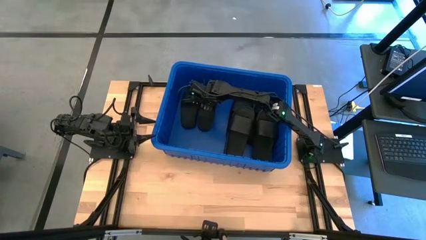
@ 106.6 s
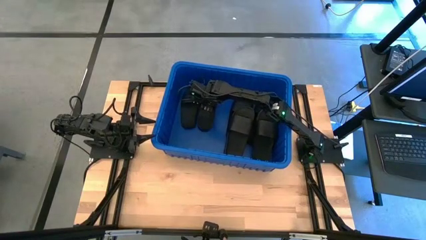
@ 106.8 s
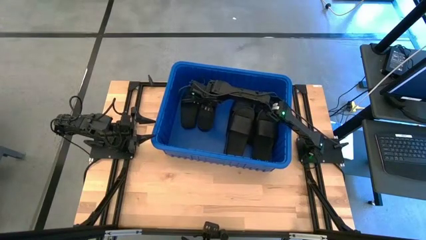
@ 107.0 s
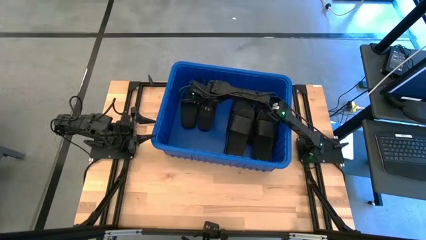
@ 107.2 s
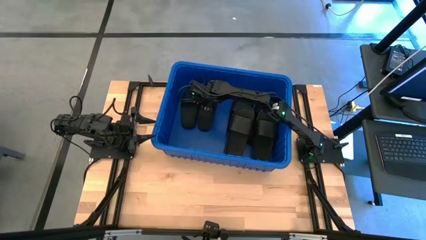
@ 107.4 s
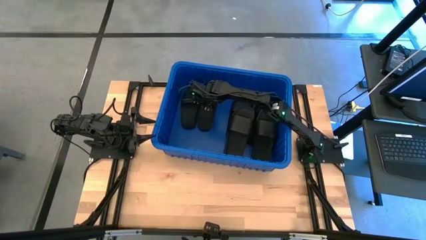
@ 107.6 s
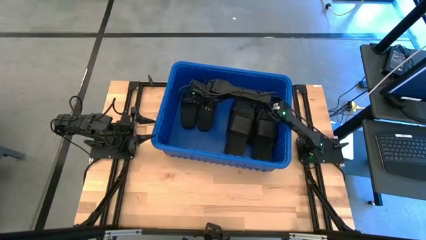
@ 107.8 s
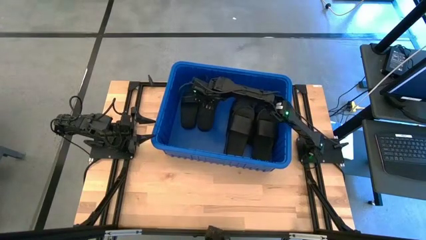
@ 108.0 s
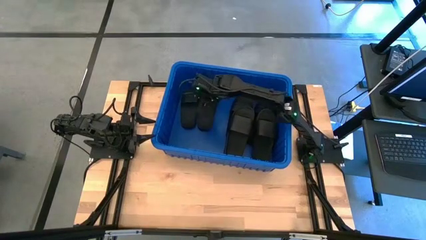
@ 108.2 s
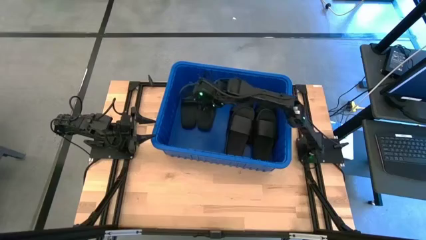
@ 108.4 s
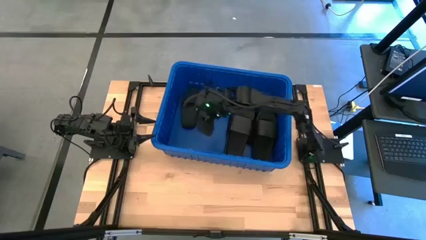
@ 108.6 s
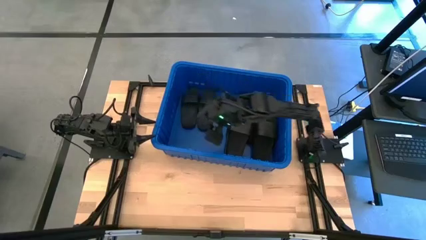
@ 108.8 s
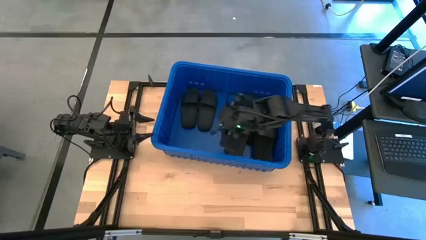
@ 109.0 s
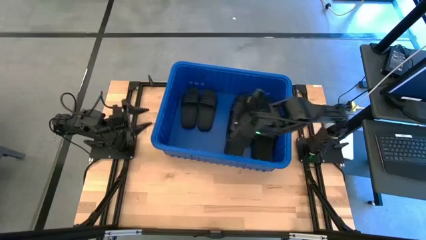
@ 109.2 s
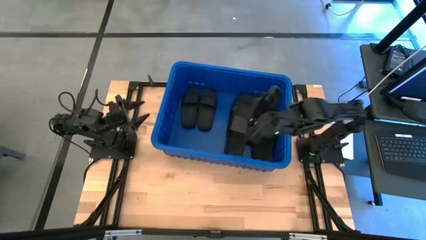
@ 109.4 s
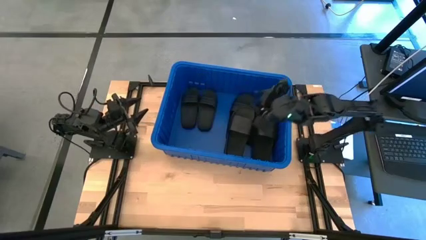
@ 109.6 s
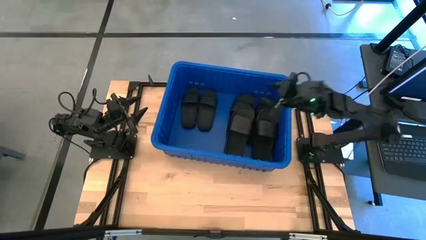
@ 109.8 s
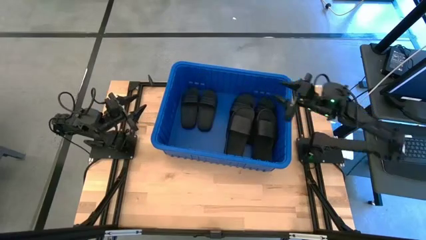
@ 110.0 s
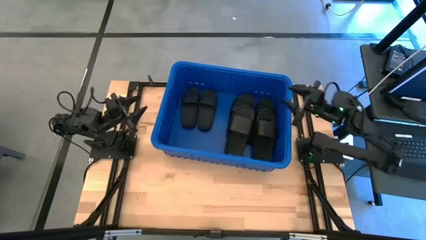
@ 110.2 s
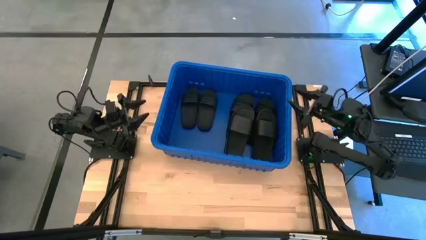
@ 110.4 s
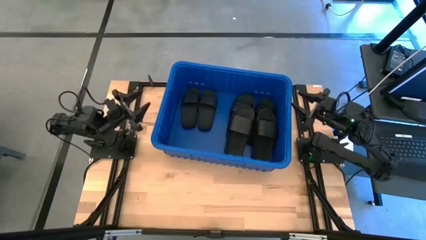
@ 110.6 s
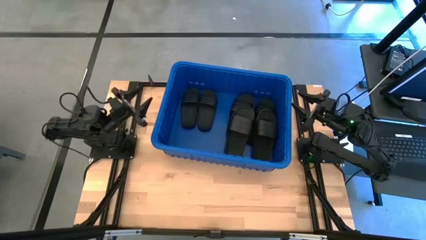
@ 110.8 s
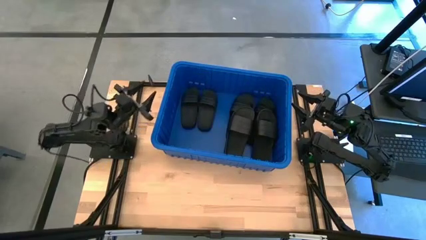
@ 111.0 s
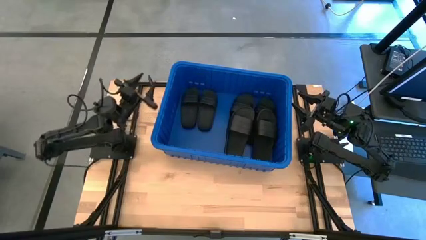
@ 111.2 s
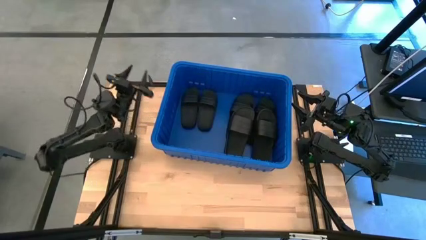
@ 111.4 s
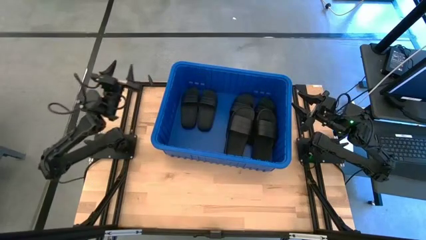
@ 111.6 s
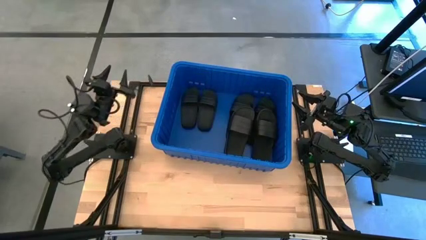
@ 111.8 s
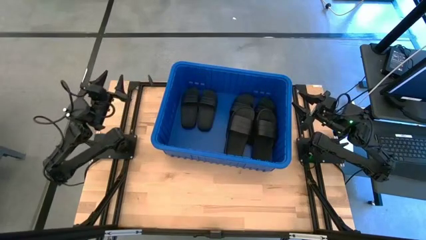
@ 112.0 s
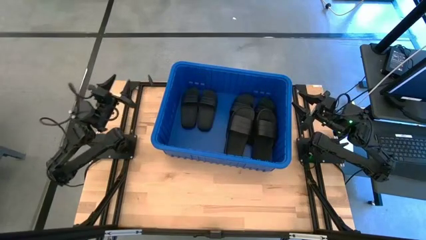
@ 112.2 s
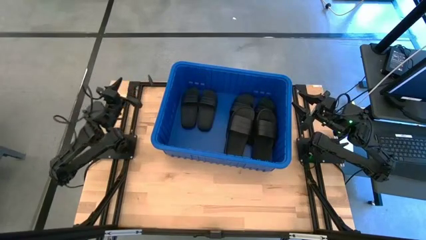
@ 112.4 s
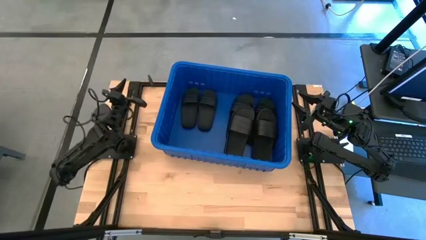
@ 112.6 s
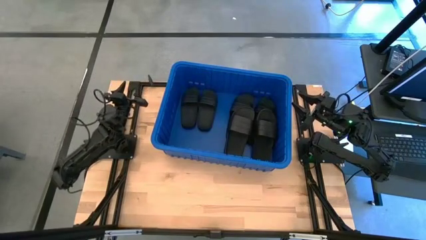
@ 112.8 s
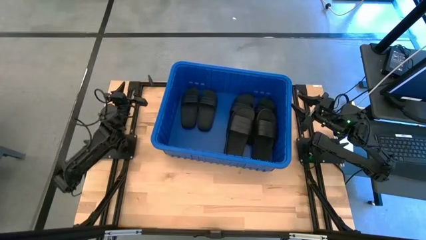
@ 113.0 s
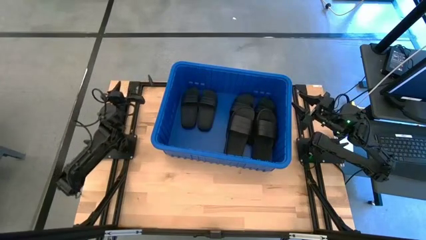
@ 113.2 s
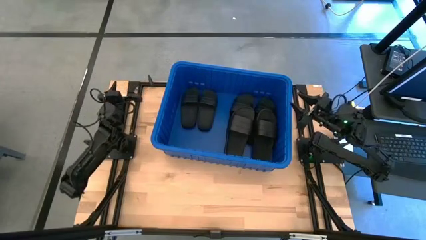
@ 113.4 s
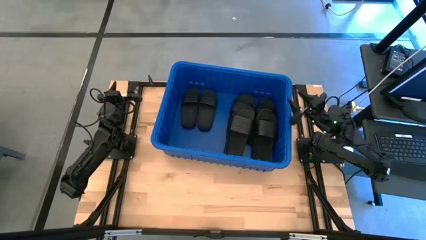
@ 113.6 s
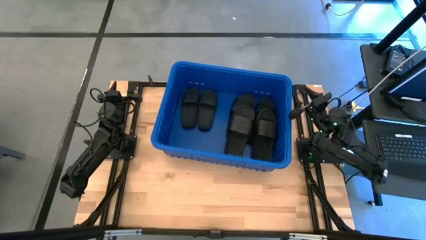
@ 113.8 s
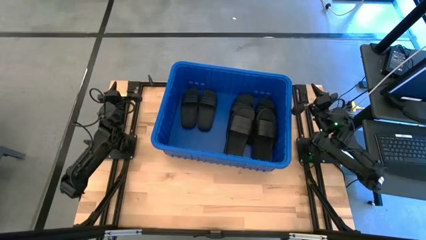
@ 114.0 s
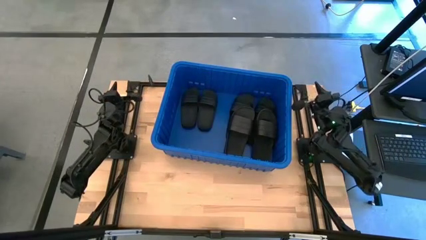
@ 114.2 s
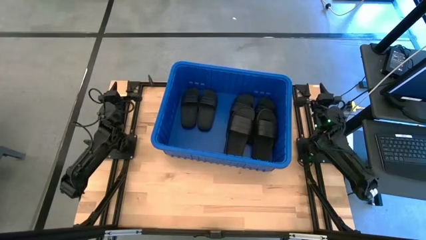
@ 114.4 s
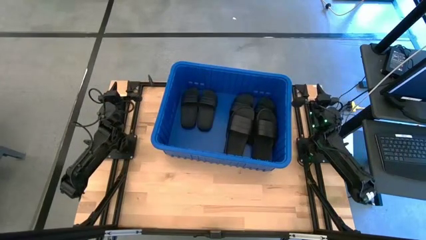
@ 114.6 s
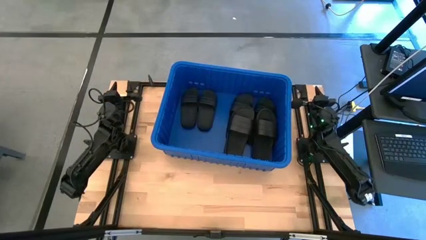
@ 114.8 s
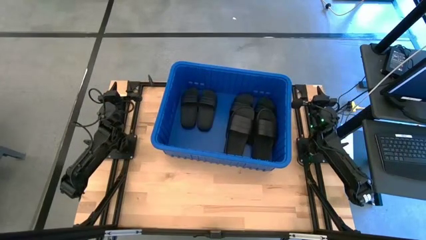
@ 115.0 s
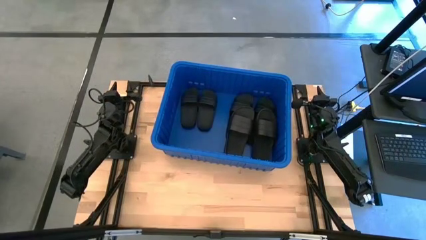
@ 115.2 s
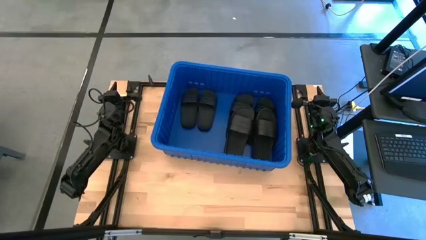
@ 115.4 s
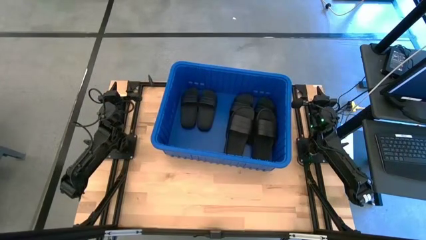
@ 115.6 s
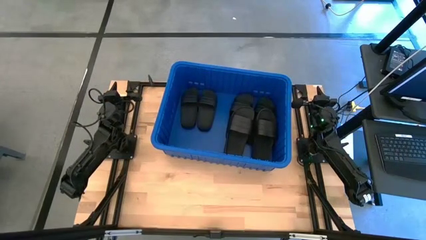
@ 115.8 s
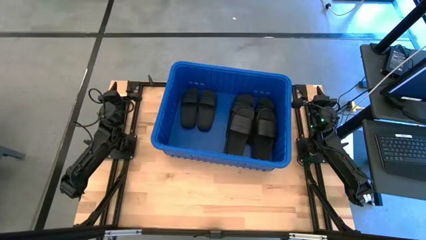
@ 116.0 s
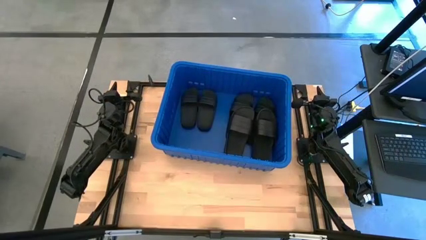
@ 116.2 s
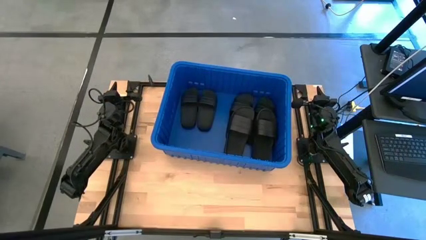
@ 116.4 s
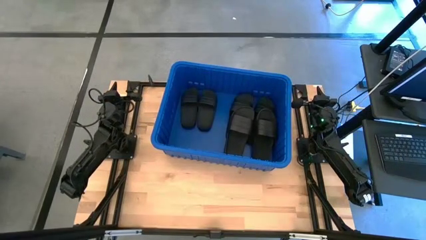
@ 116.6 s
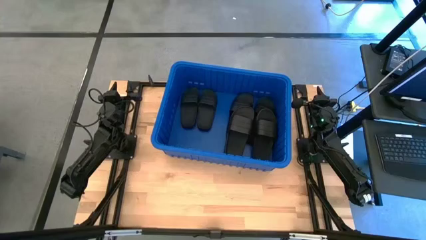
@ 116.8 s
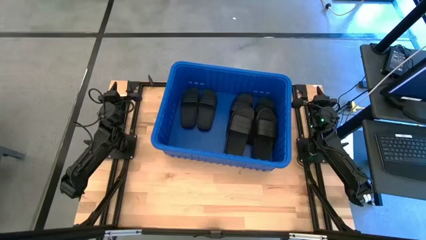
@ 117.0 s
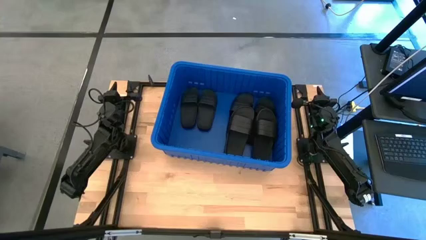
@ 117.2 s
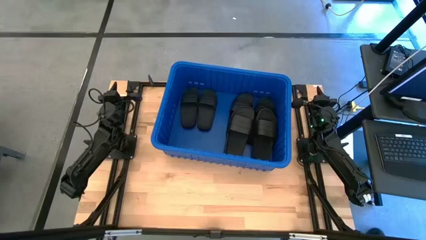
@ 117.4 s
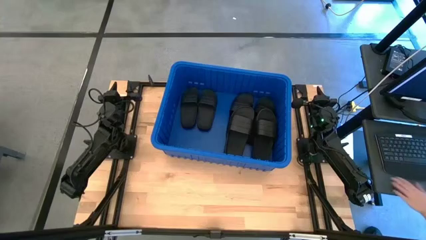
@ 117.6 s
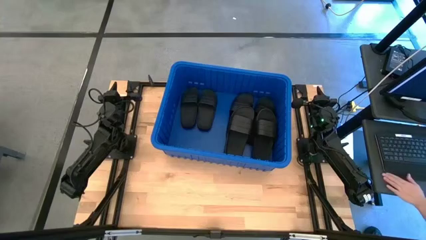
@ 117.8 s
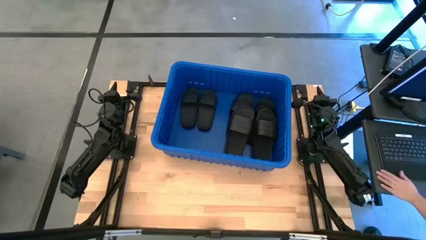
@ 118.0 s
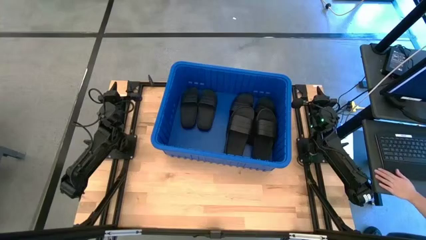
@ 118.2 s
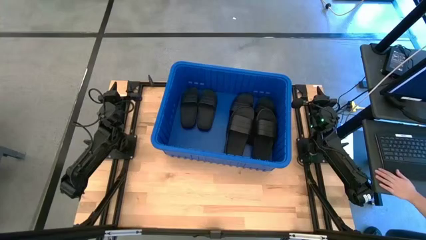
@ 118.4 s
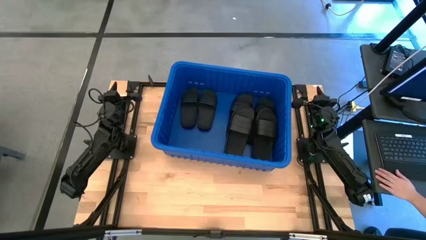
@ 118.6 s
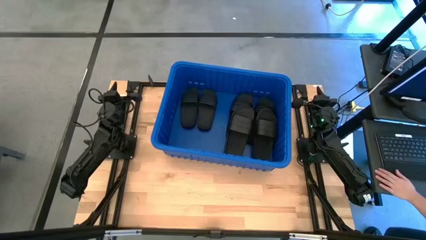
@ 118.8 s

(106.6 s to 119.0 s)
Task: Pick and place slides into bin
Return to Home Position
